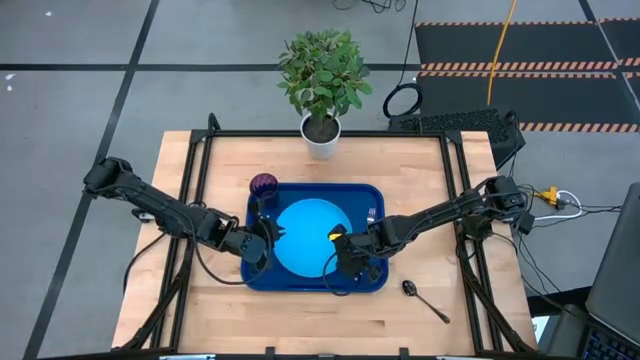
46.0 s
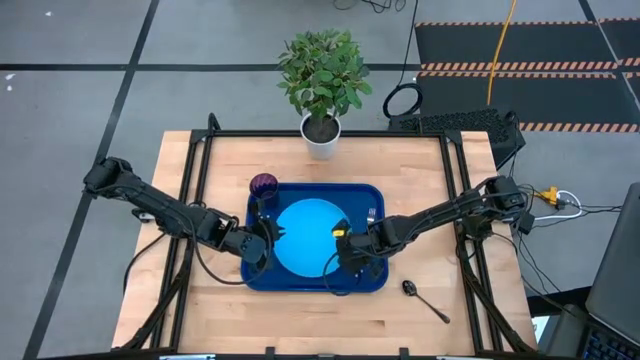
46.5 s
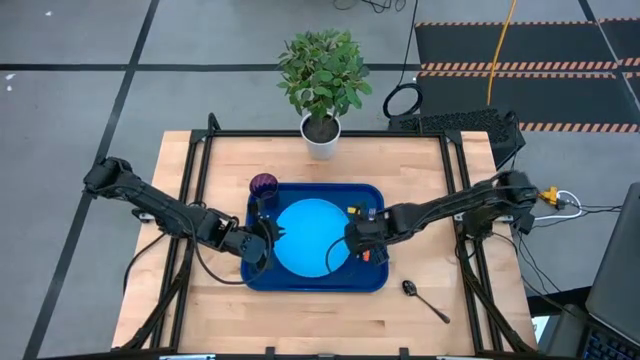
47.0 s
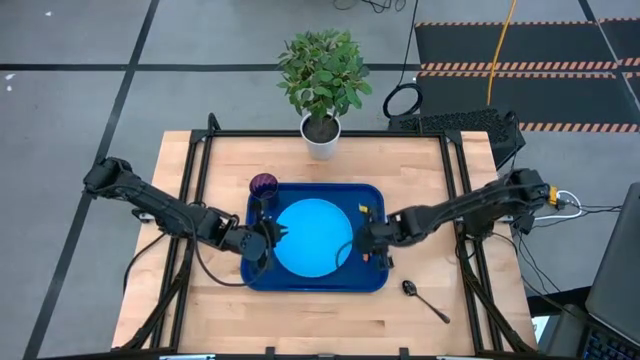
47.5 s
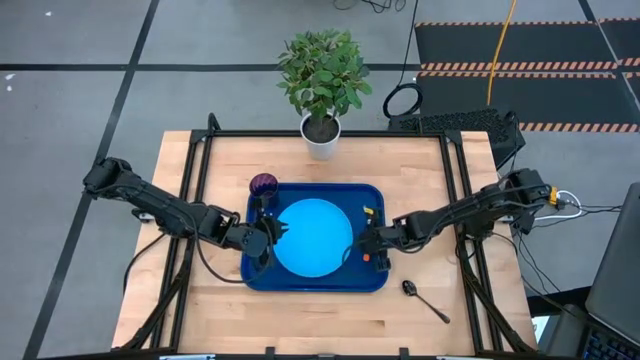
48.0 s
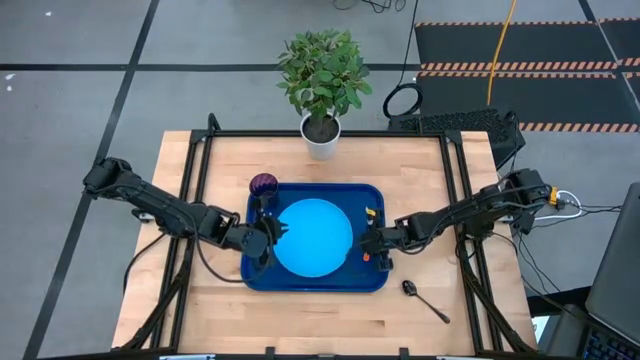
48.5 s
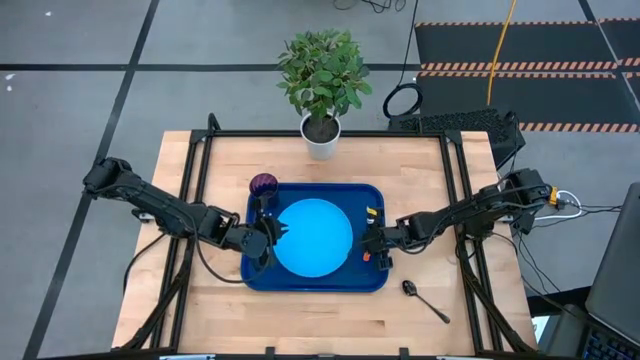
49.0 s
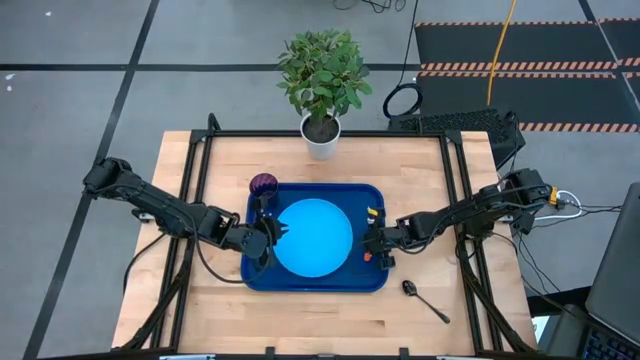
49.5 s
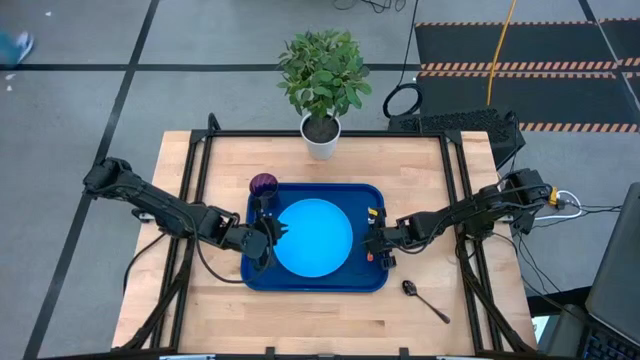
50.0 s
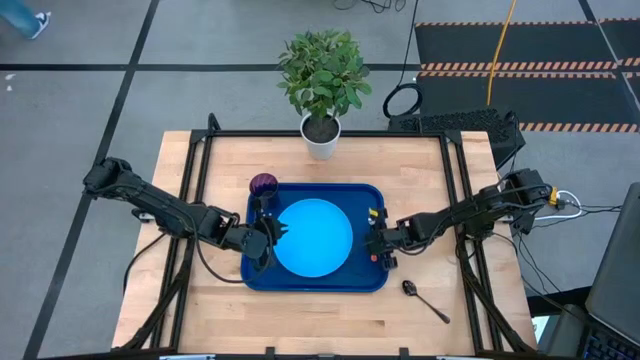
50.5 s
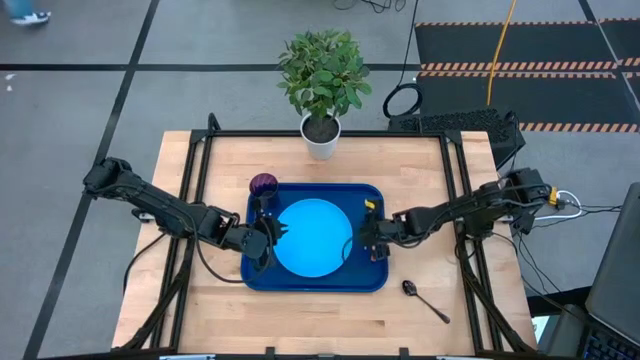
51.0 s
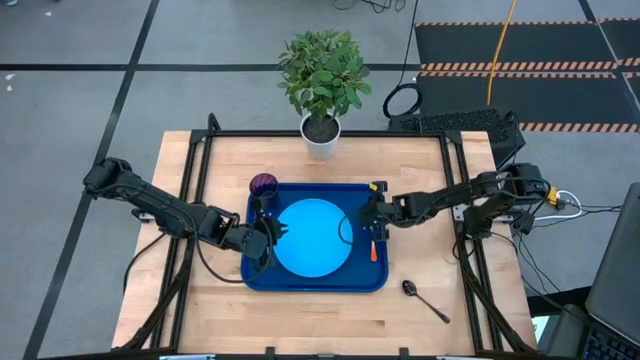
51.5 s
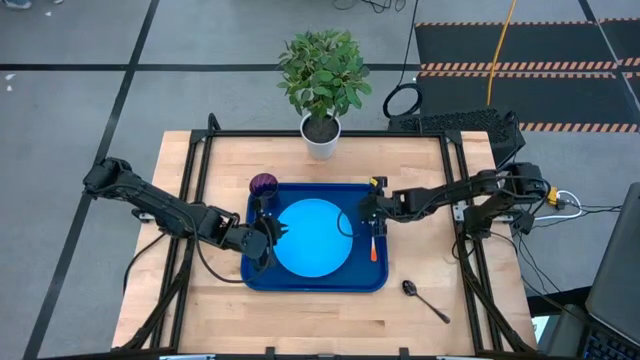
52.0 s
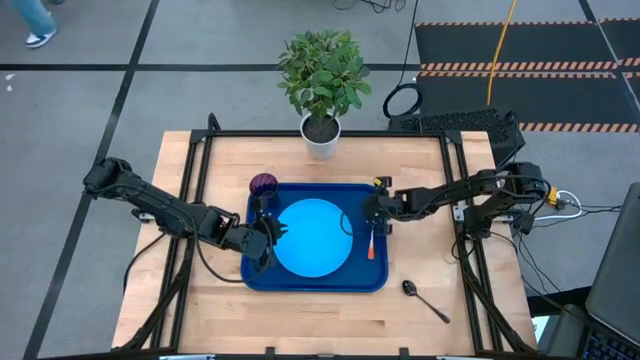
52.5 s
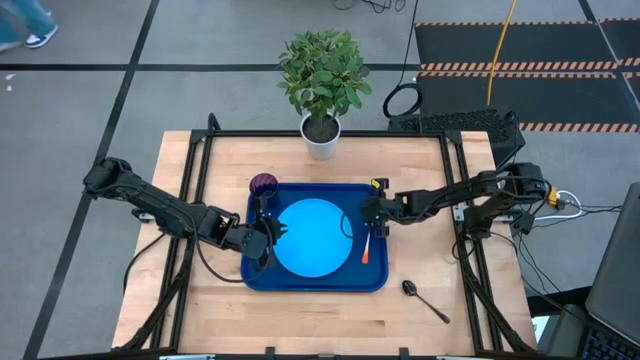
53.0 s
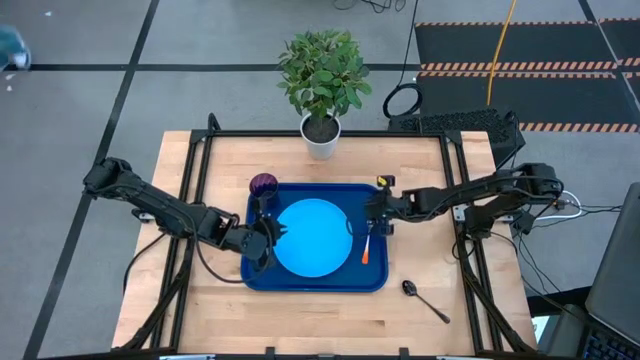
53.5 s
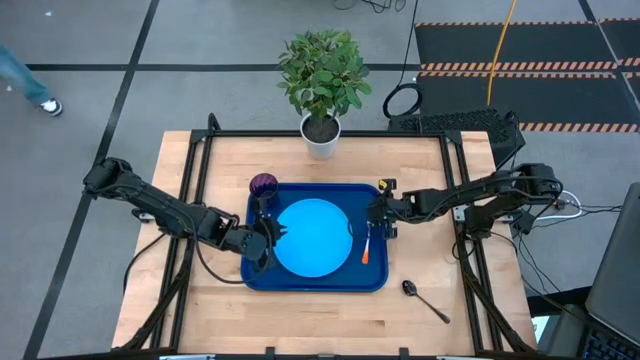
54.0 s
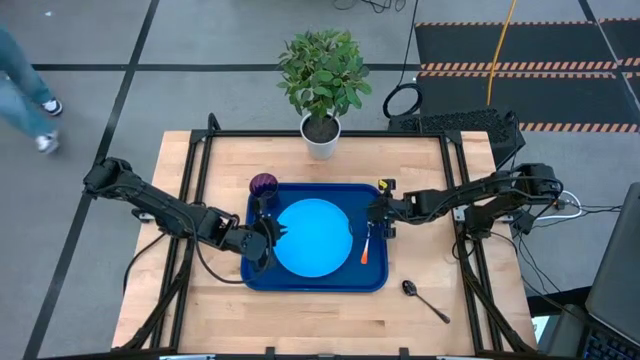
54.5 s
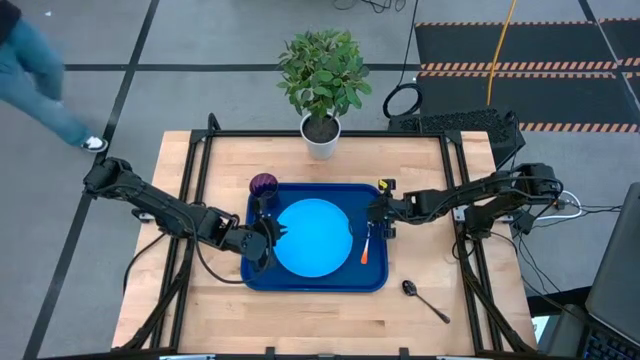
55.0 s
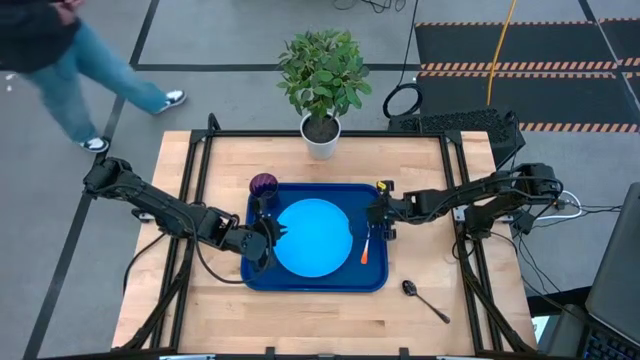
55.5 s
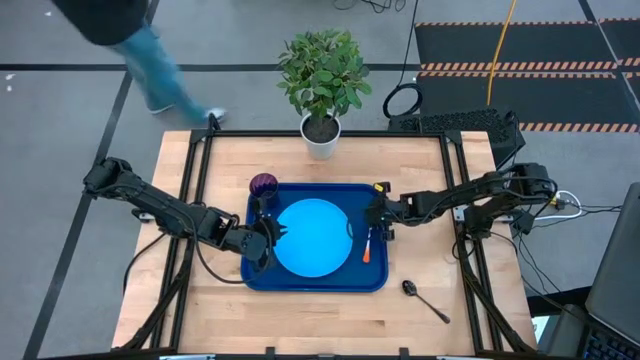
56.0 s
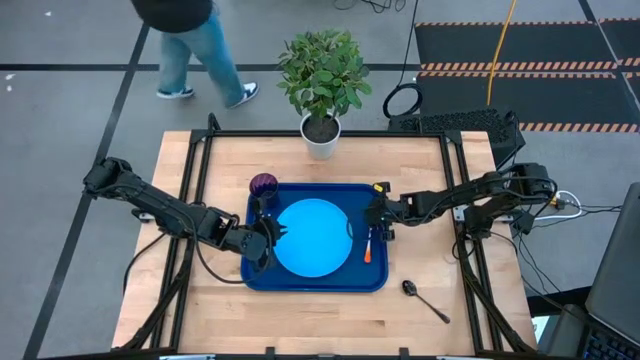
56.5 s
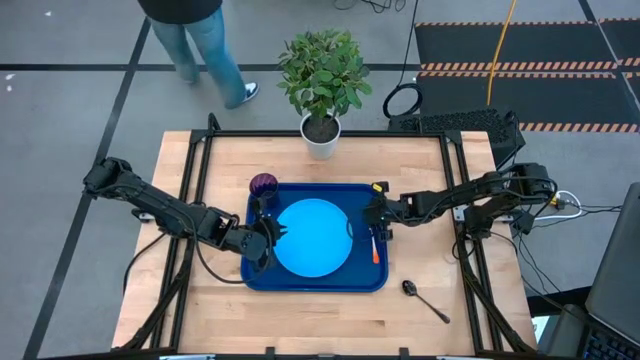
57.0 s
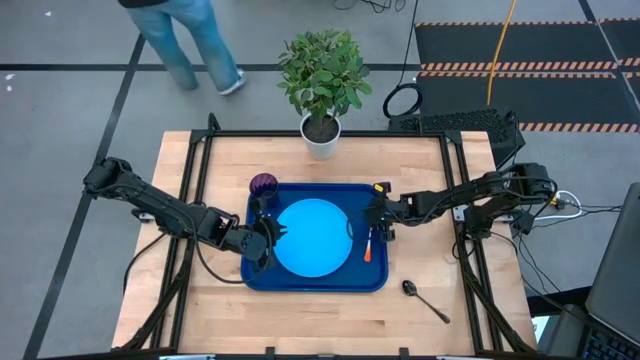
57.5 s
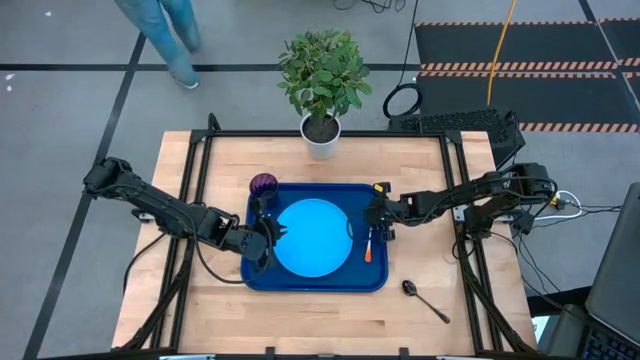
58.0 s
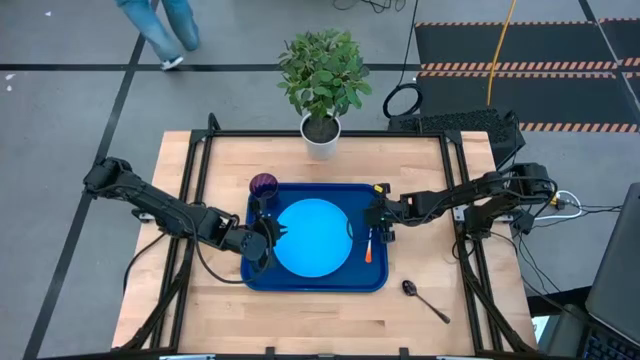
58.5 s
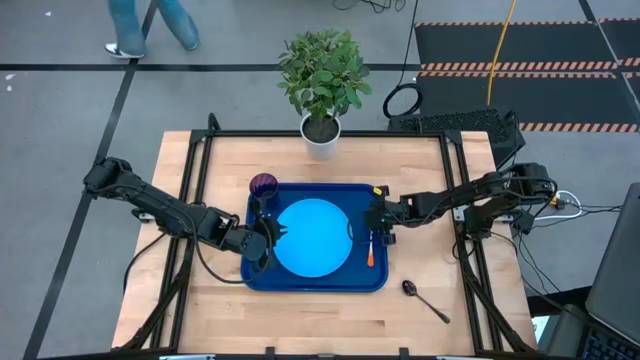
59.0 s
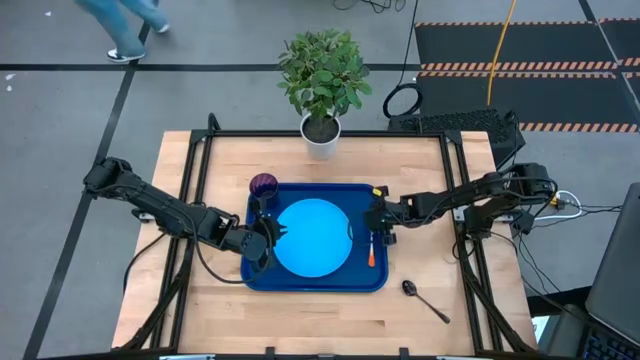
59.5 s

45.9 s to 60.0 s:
Task: Pick and place plate/cup/fork/spoon on tray
Adjust the orange fork

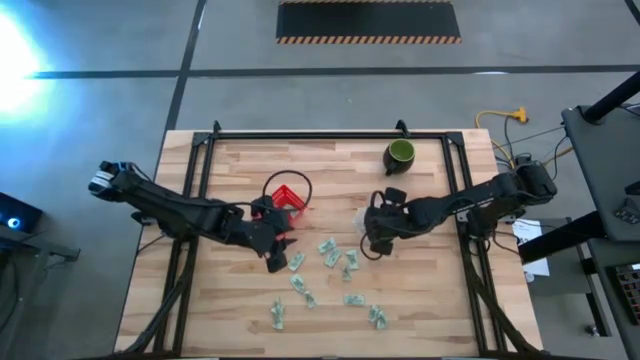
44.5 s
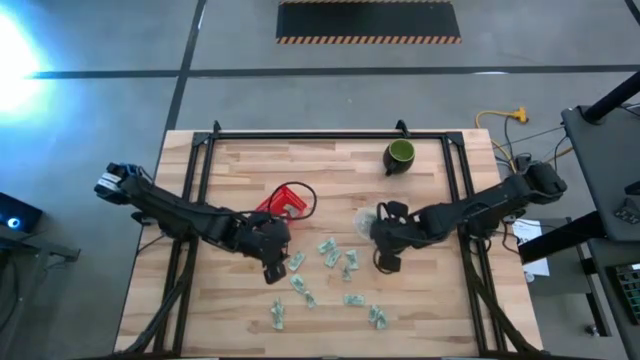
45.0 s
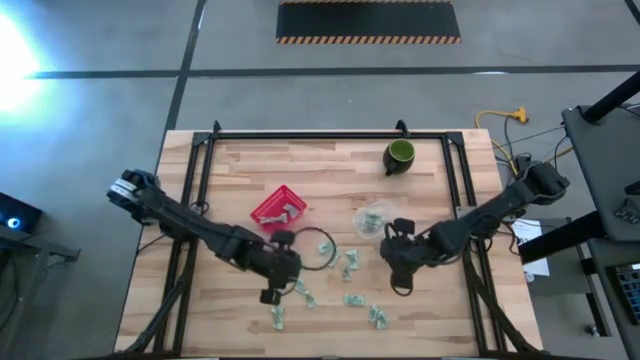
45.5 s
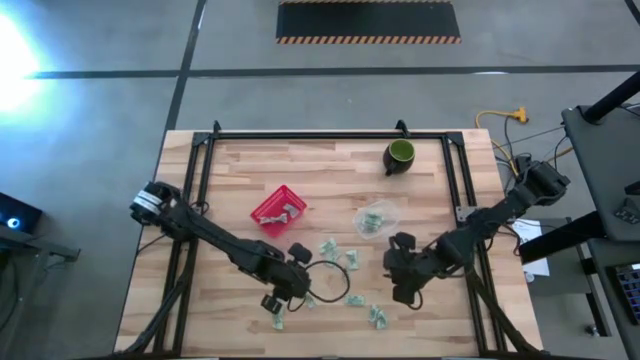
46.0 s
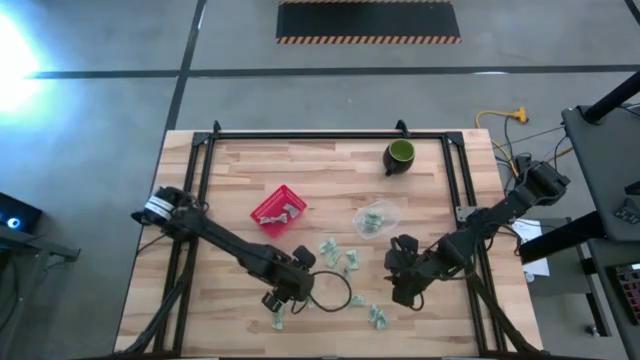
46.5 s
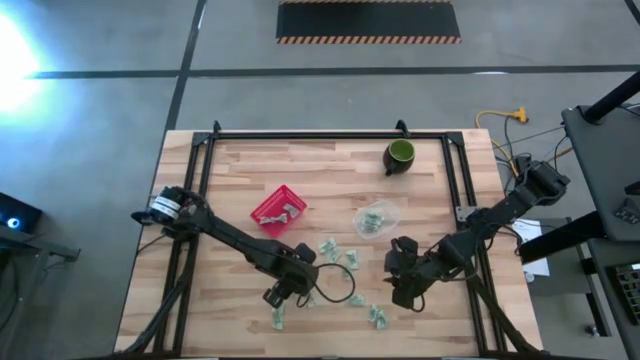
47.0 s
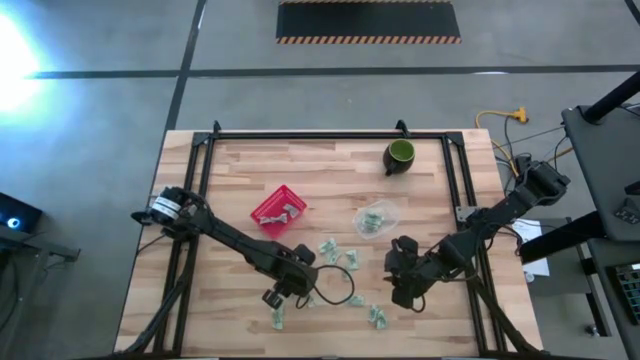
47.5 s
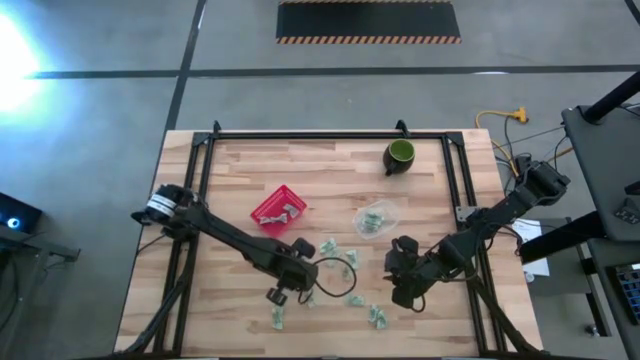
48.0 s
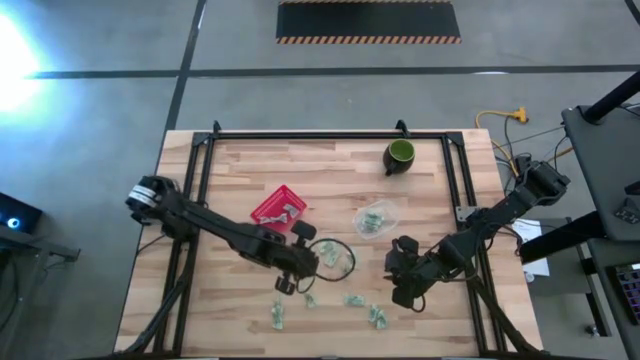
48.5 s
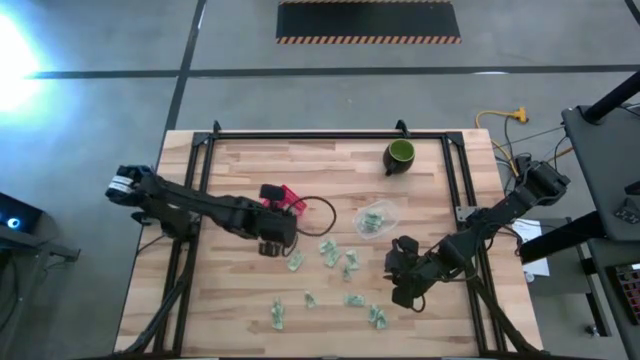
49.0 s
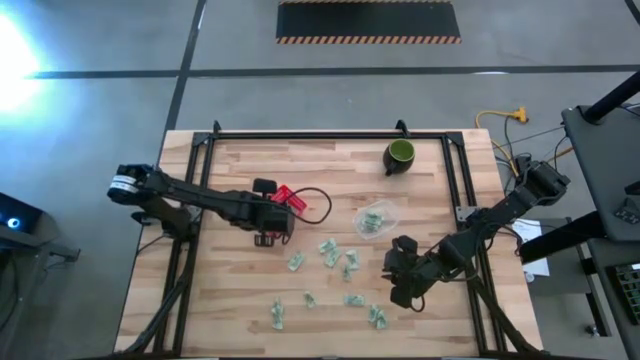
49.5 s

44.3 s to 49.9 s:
Task: Pick and place items into bin
Put the stevia packet into the red bin
